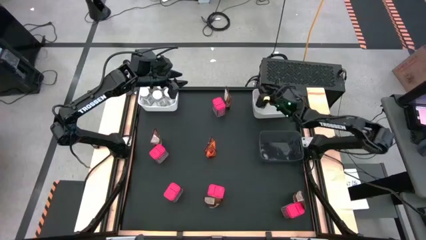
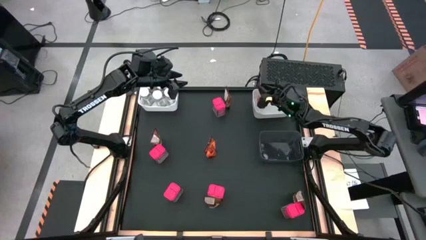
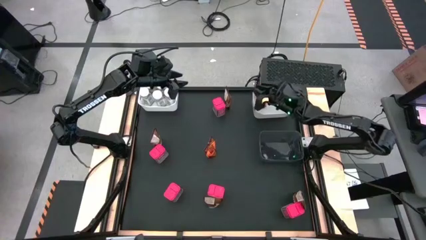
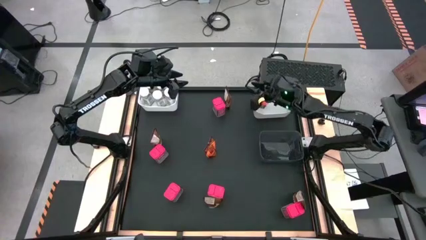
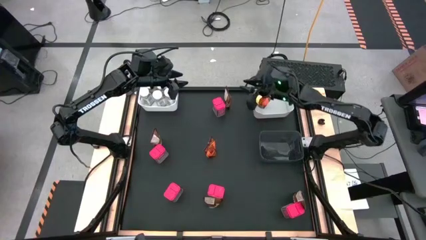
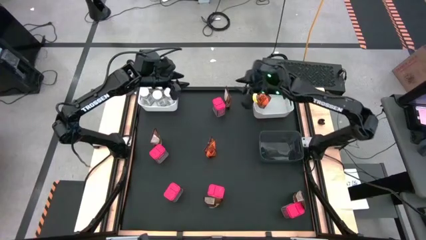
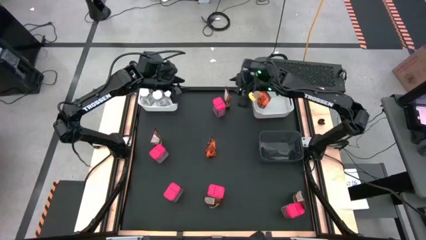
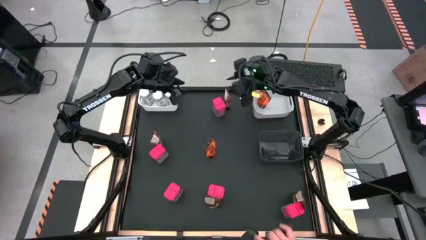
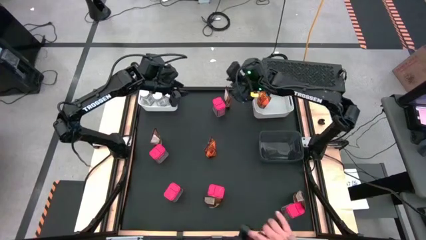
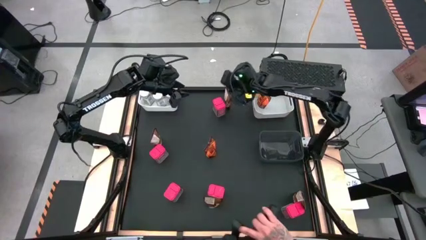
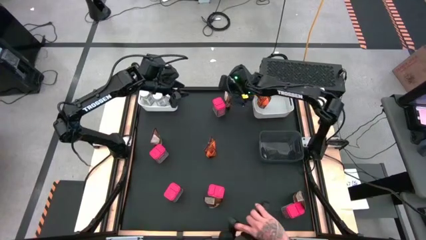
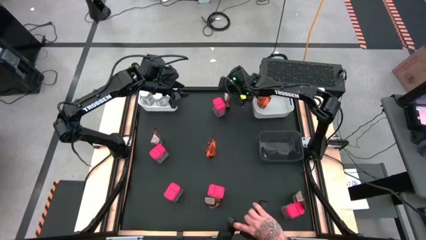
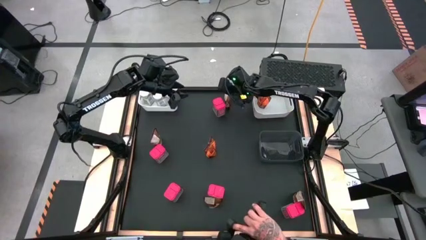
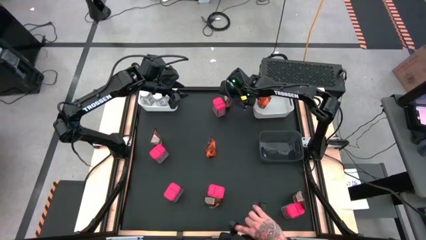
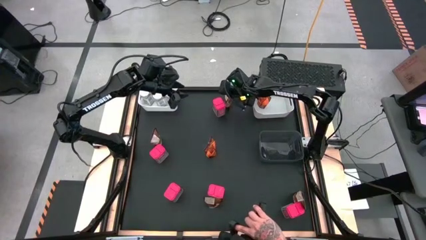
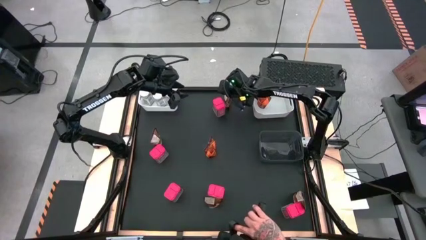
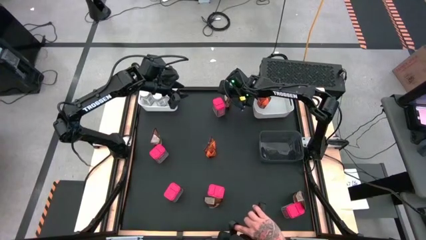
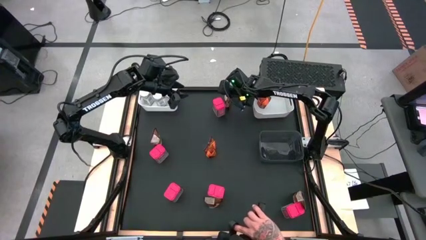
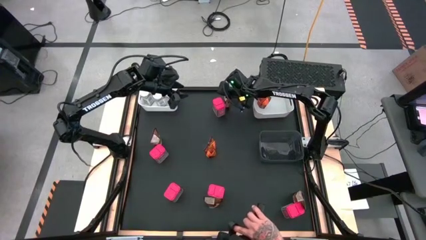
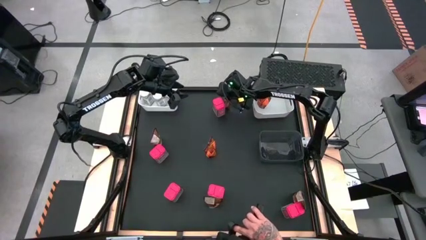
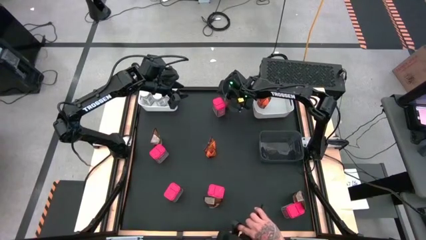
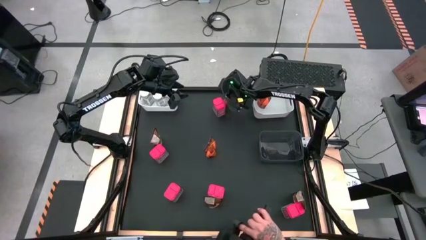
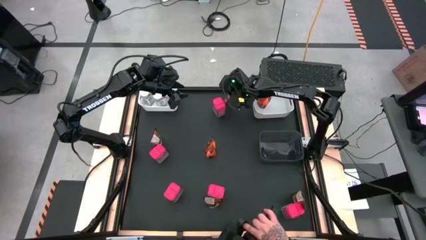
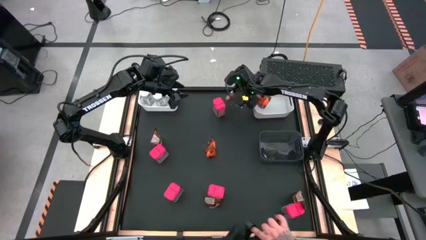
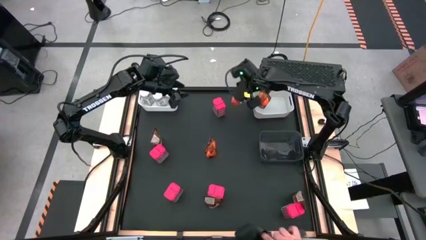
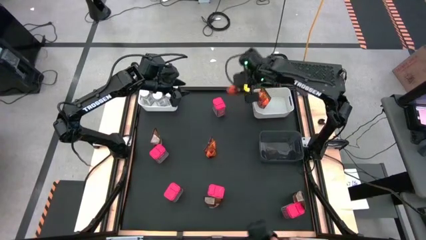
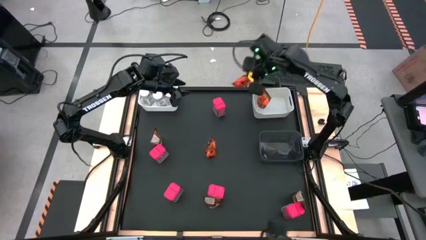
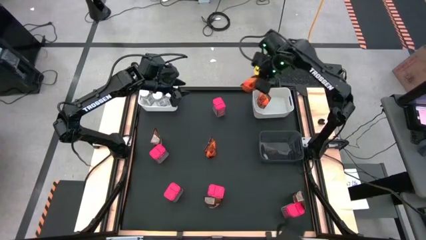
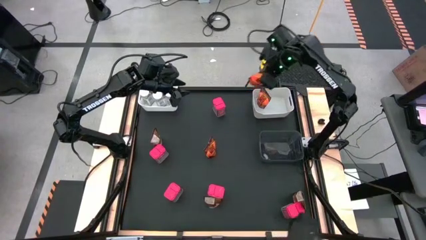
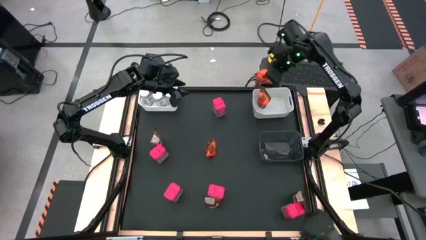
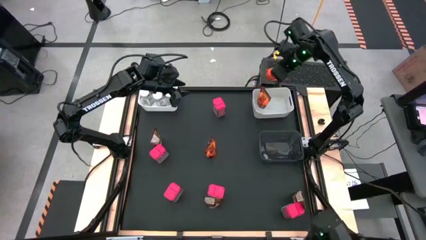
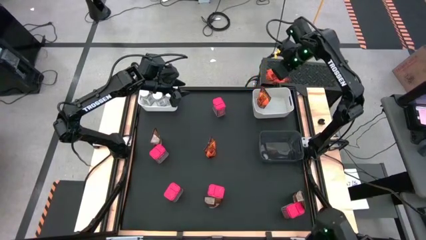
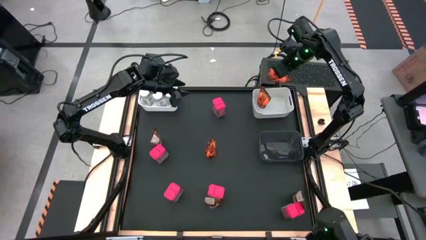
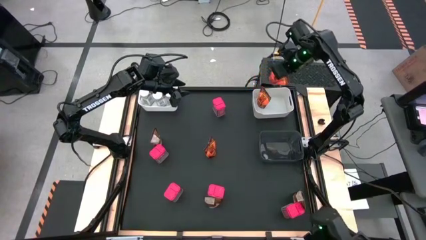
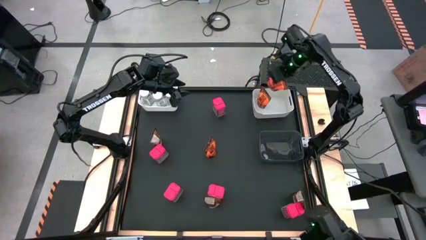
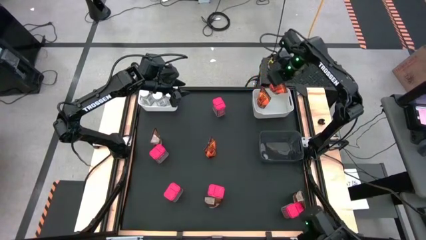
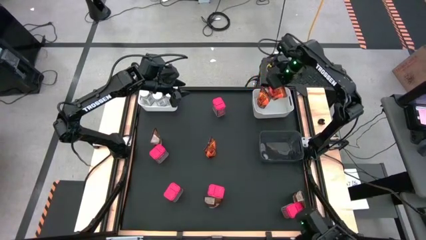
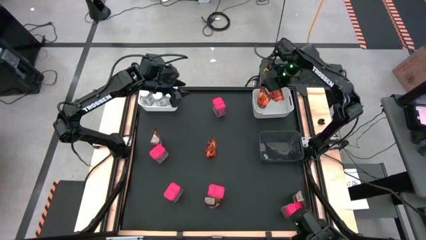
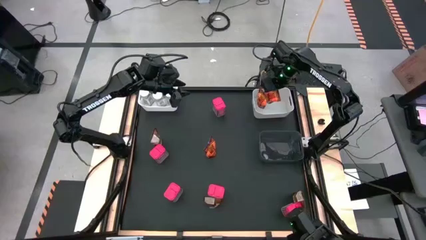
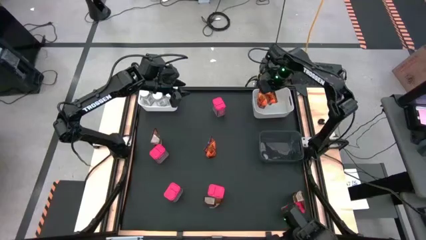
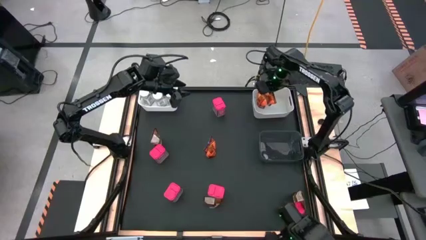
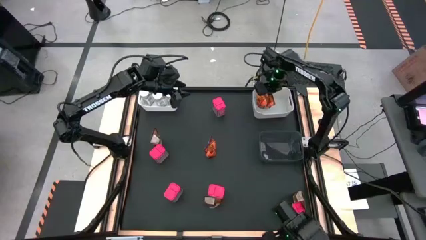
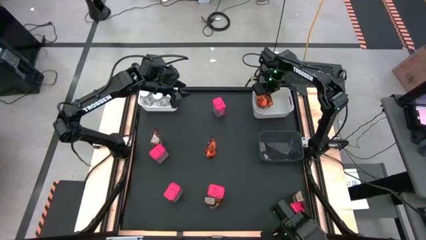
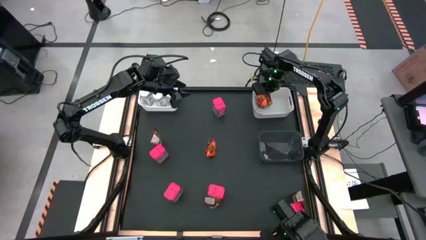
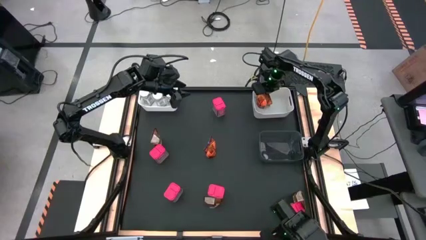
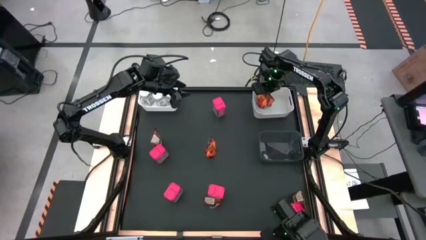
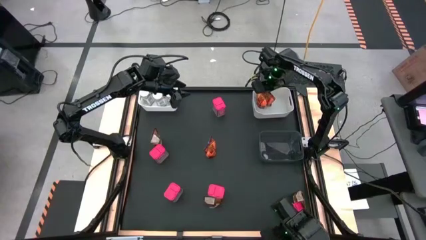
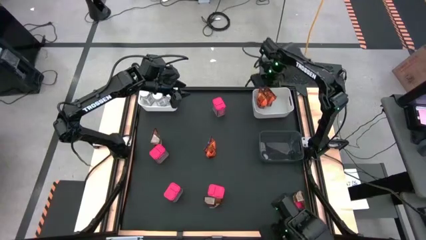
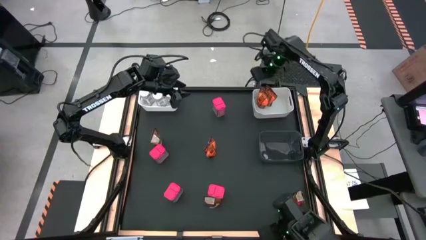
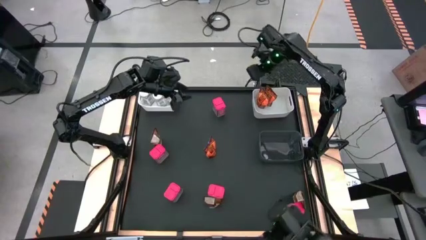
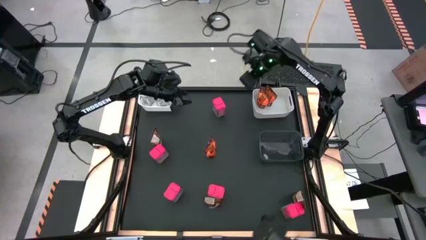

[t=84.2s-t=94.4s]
Task: Sort spices by type
Put the orange seasoning bag into the right white bin

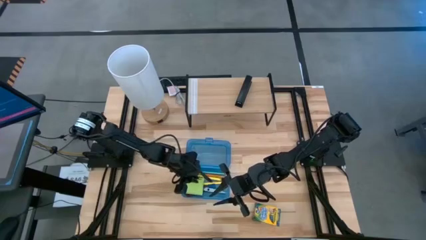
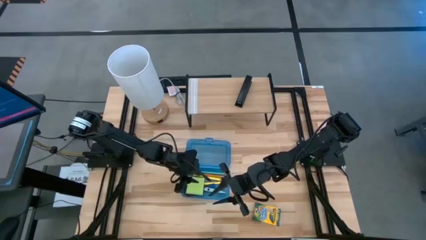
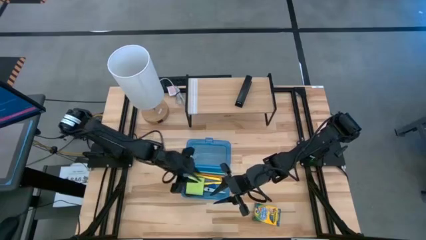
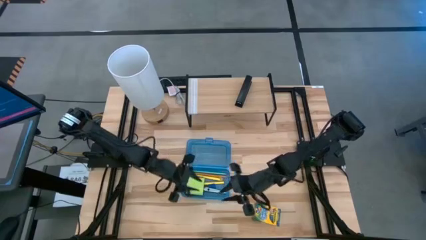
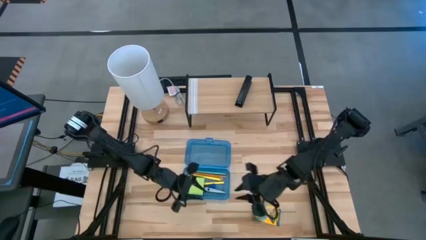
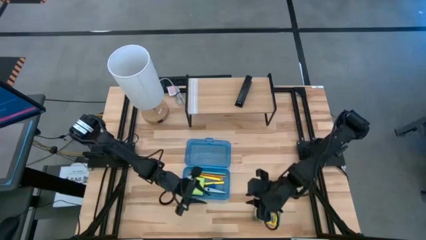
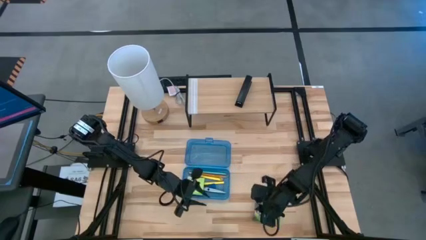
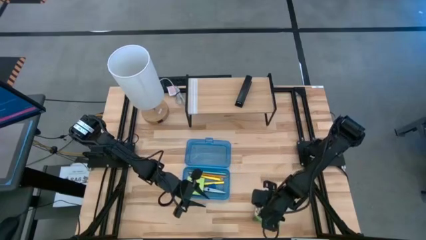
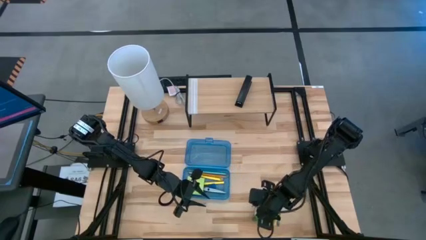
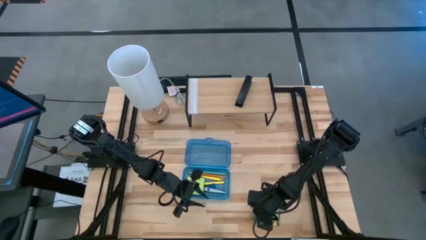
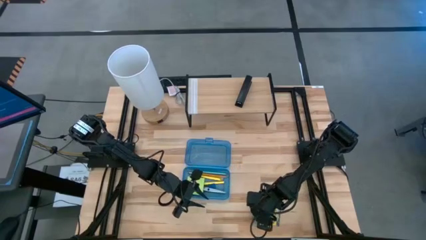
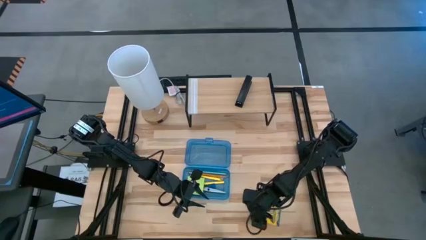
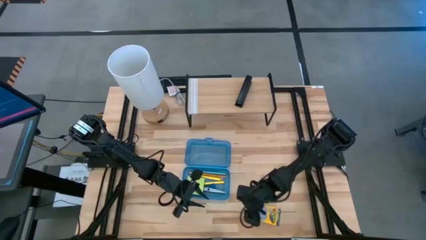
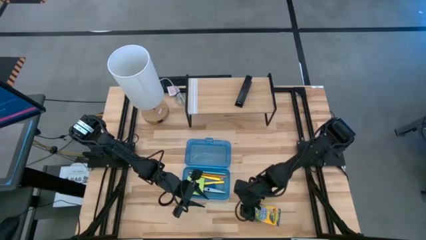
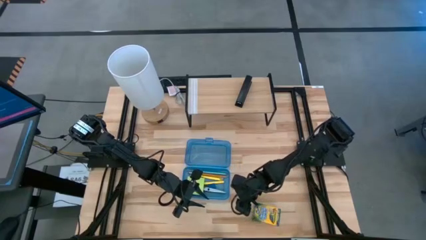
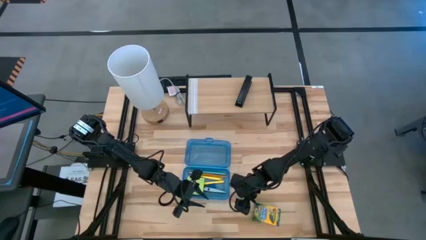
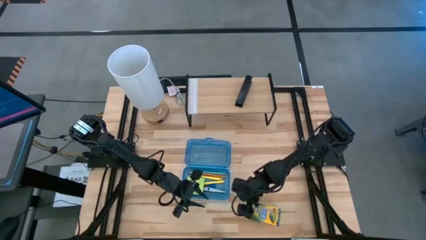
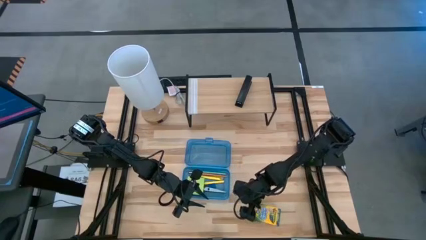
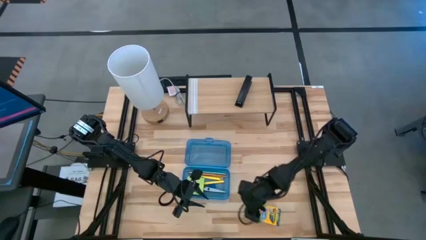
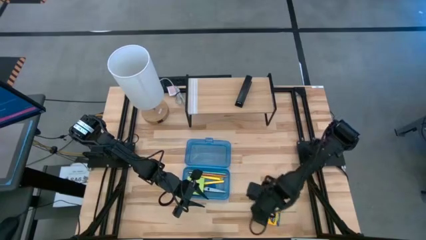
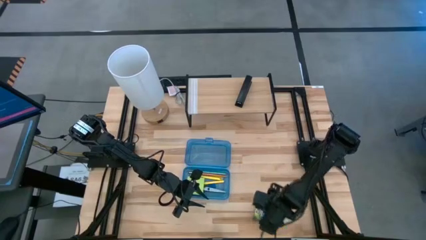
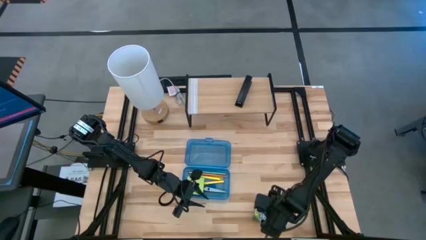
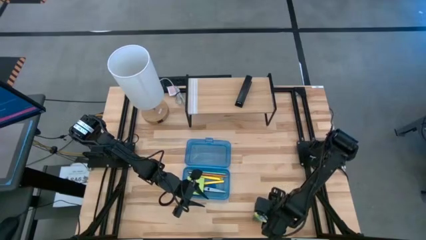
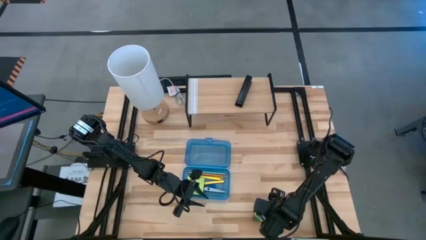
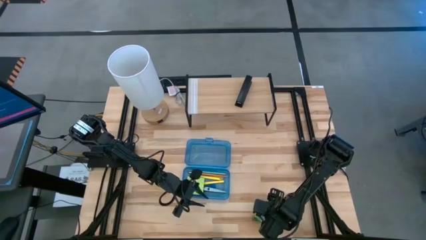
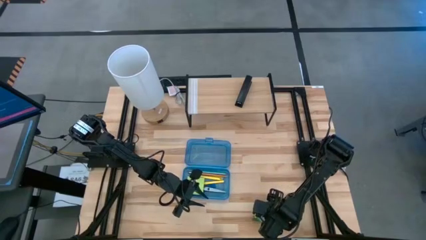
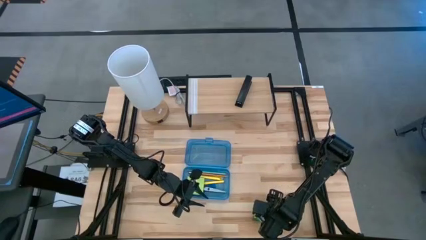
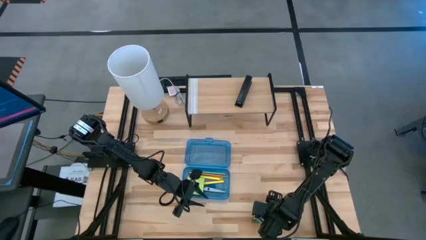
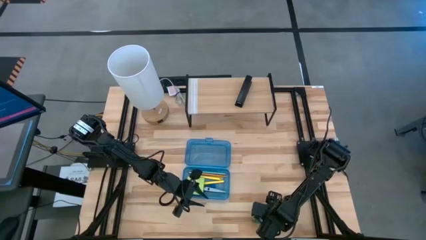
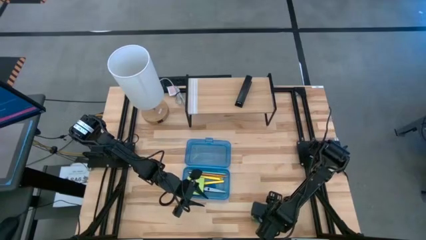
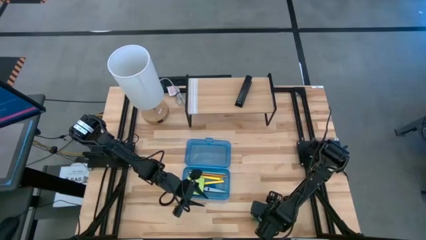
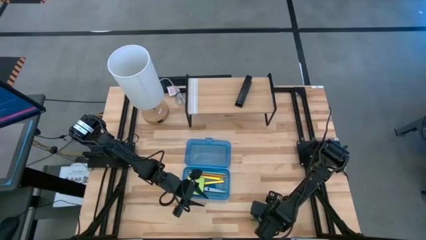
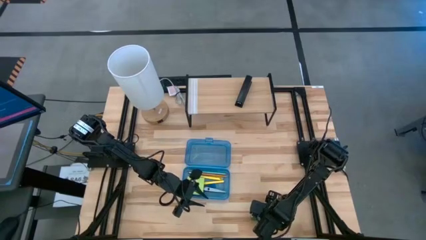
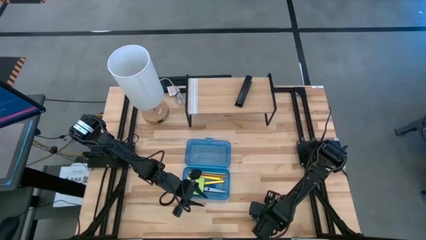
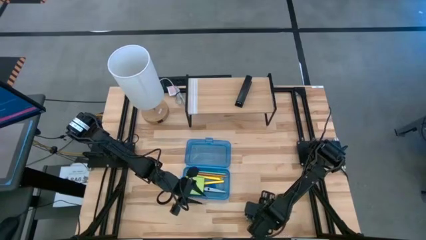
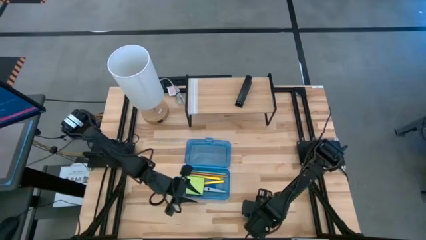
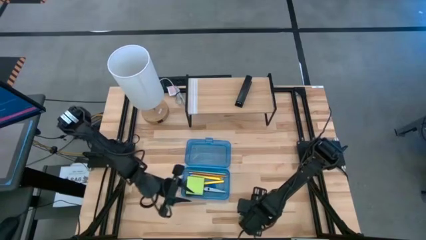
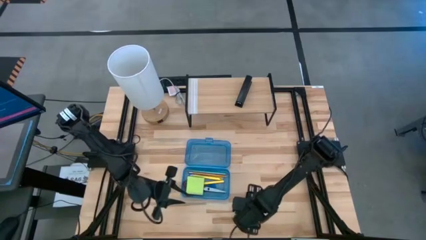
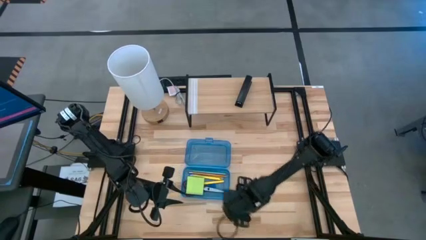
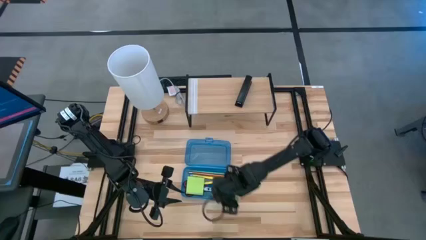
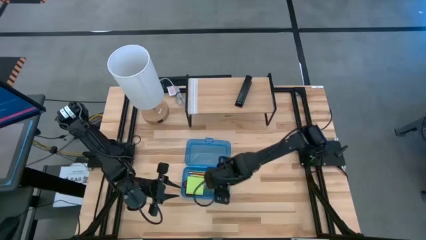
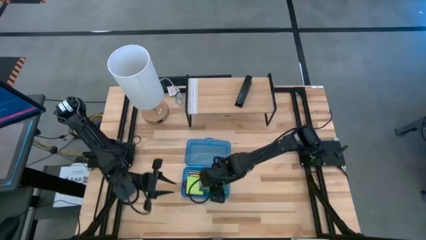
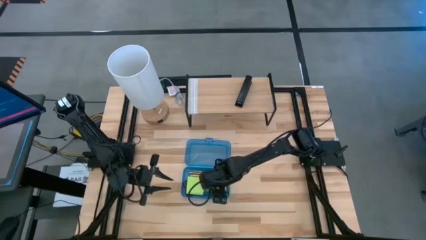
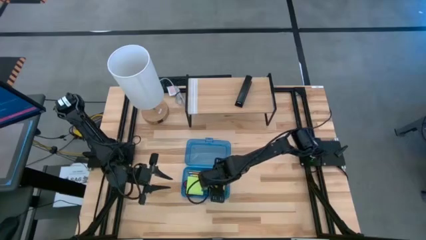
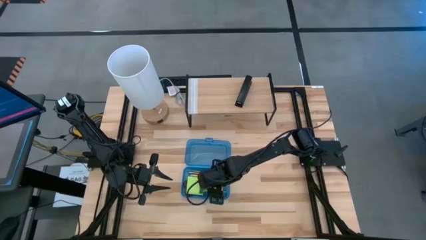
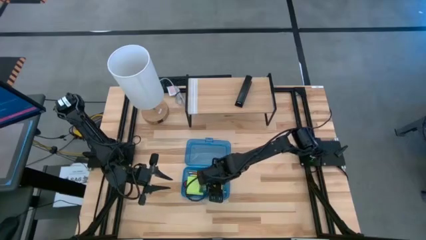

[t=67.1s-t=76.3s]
Task: Pack school essentials
Put the yellow crayon box into the supply box
